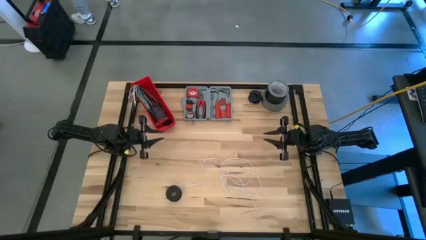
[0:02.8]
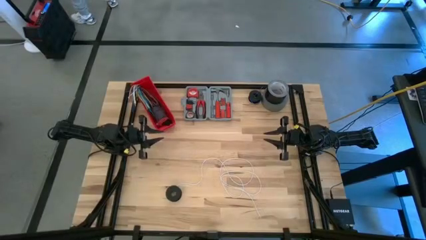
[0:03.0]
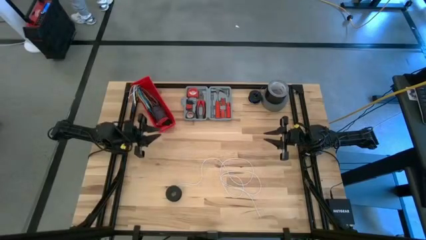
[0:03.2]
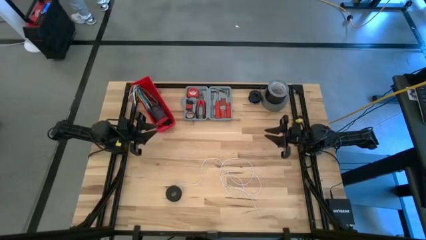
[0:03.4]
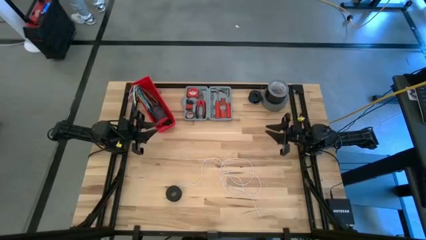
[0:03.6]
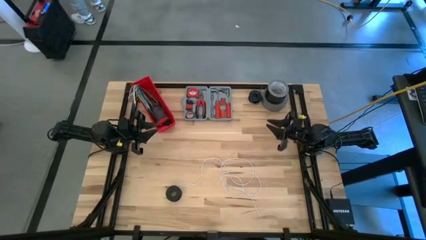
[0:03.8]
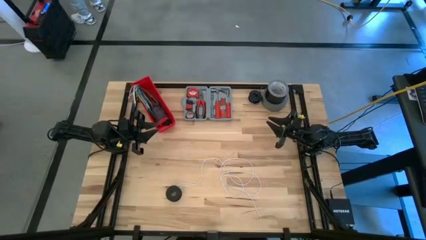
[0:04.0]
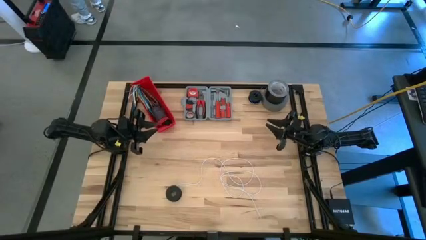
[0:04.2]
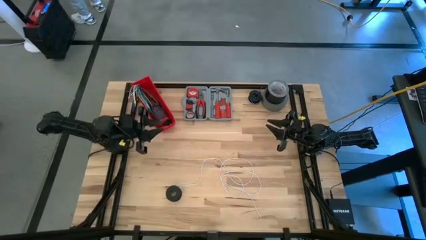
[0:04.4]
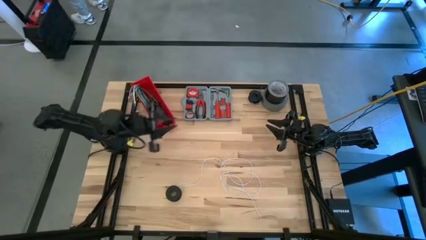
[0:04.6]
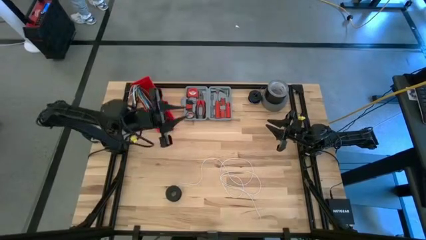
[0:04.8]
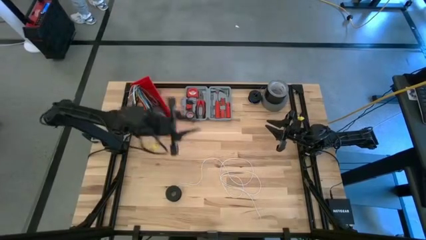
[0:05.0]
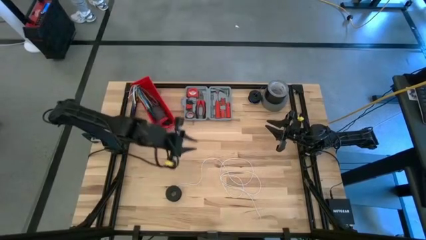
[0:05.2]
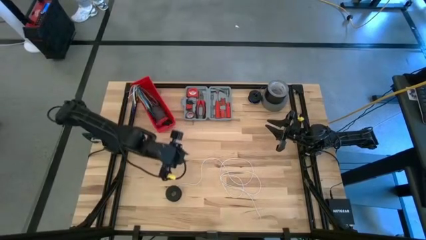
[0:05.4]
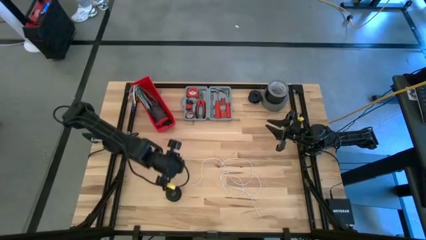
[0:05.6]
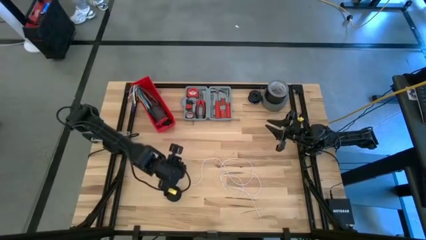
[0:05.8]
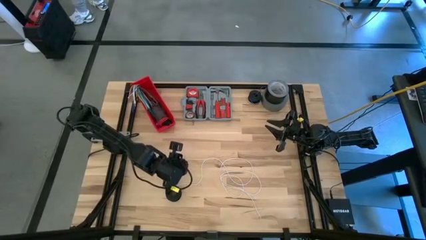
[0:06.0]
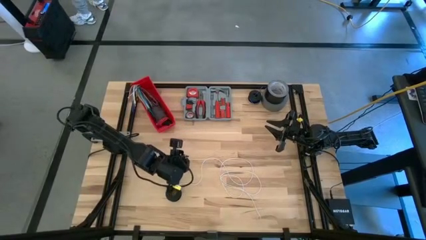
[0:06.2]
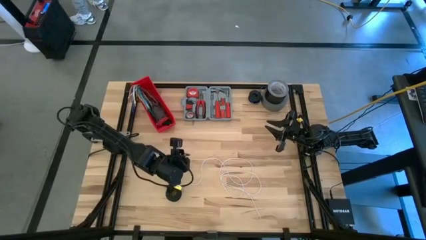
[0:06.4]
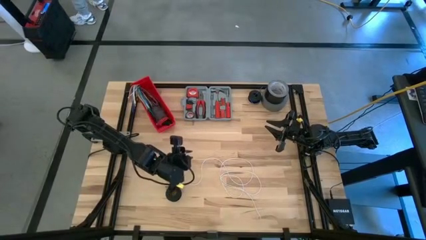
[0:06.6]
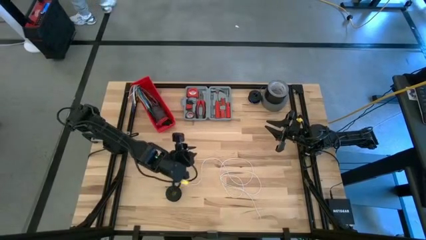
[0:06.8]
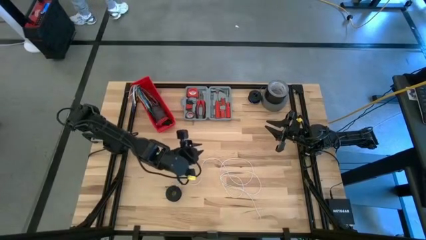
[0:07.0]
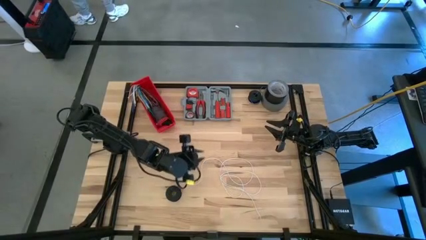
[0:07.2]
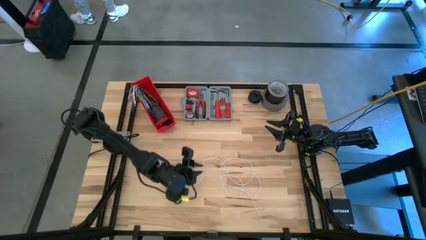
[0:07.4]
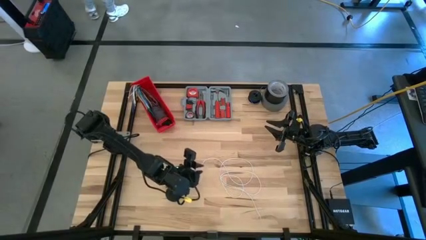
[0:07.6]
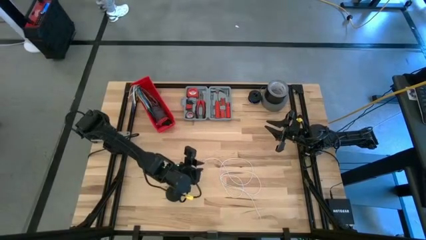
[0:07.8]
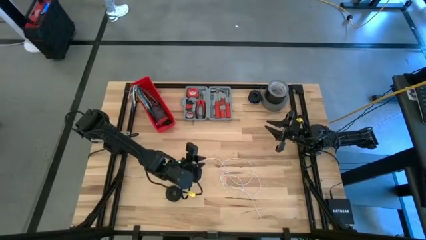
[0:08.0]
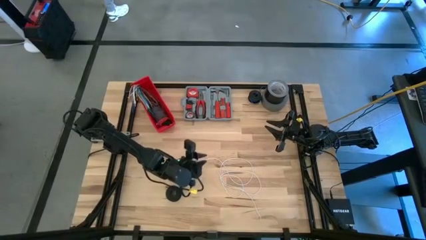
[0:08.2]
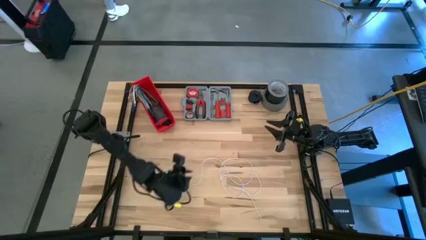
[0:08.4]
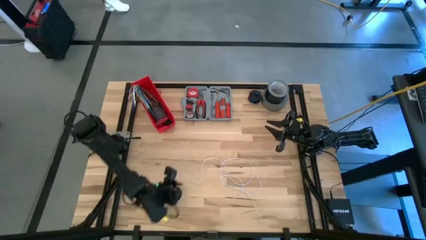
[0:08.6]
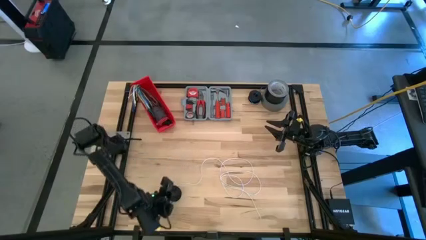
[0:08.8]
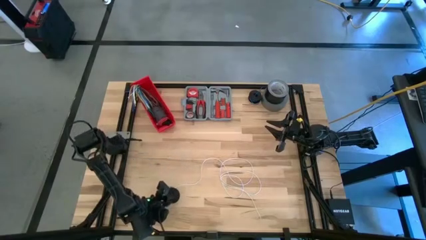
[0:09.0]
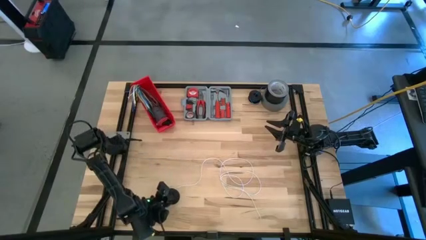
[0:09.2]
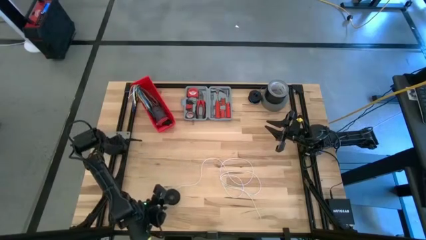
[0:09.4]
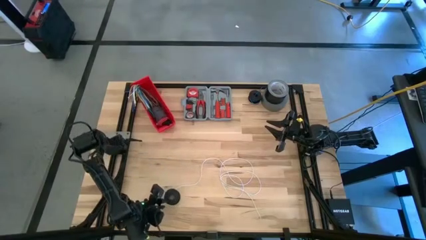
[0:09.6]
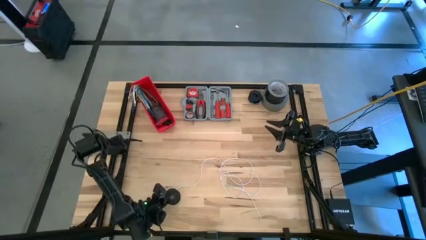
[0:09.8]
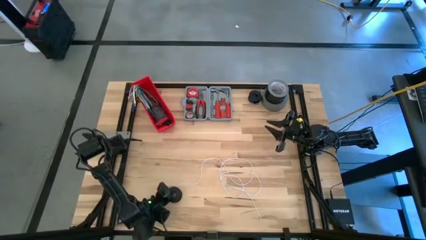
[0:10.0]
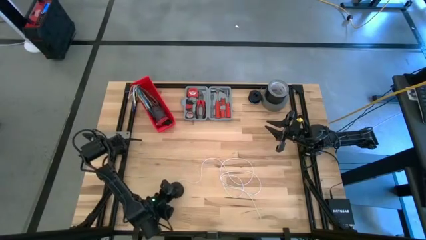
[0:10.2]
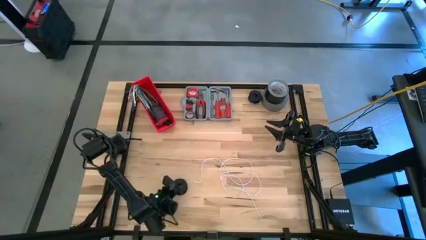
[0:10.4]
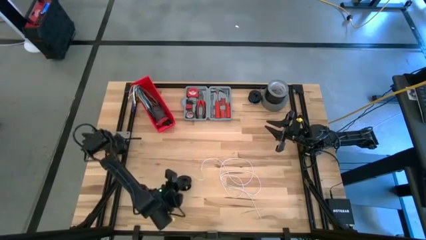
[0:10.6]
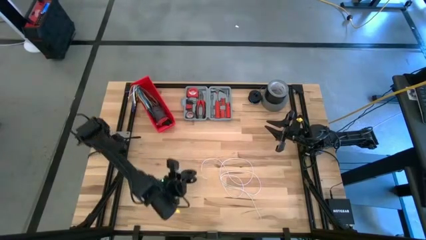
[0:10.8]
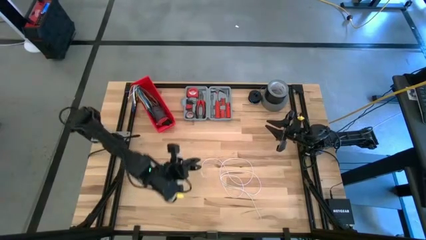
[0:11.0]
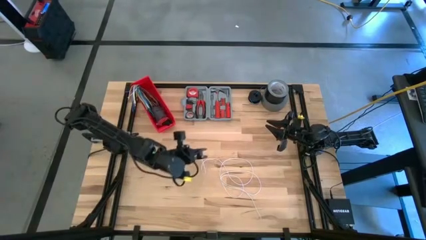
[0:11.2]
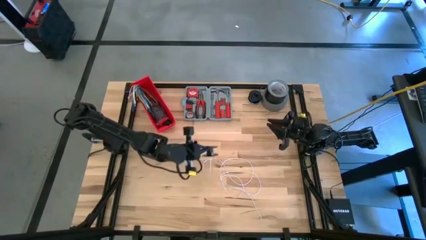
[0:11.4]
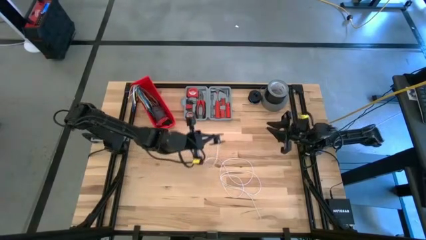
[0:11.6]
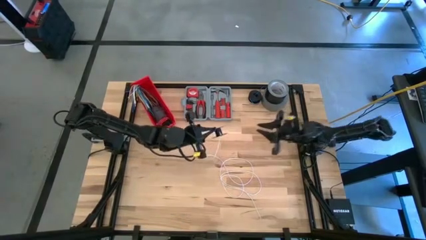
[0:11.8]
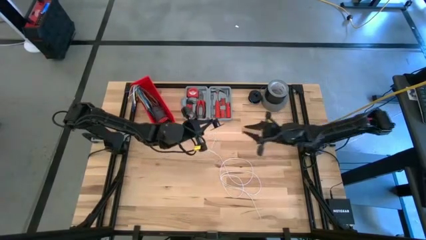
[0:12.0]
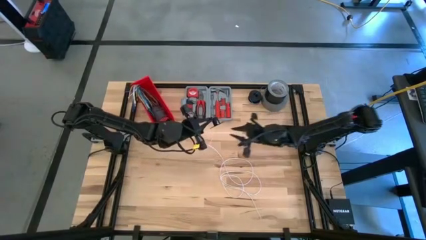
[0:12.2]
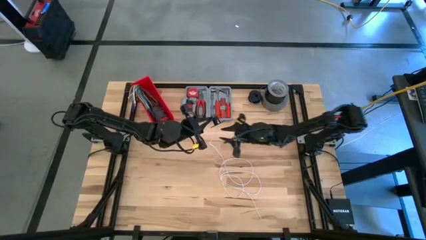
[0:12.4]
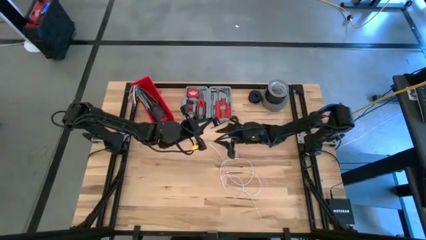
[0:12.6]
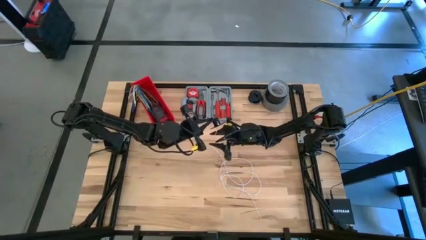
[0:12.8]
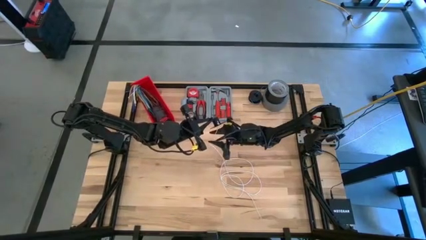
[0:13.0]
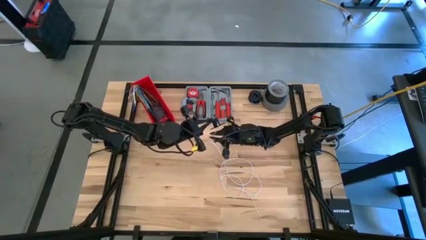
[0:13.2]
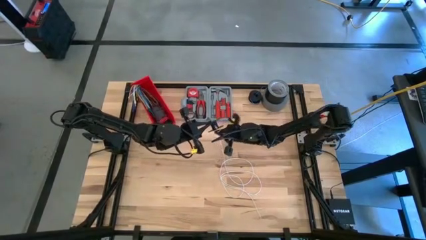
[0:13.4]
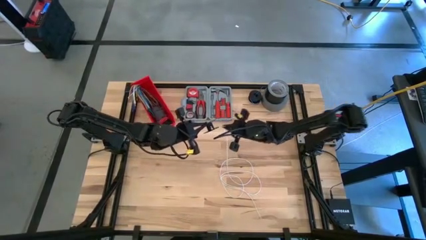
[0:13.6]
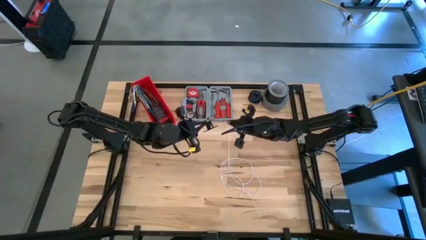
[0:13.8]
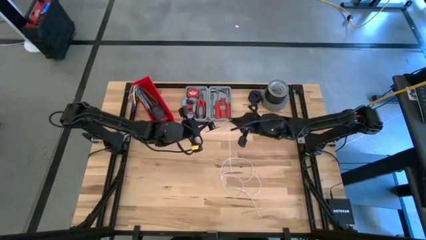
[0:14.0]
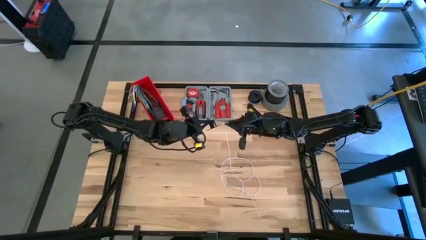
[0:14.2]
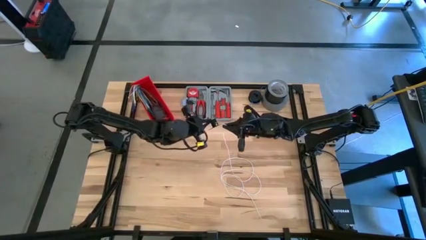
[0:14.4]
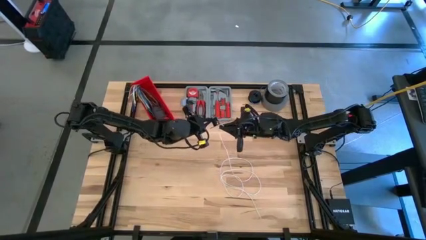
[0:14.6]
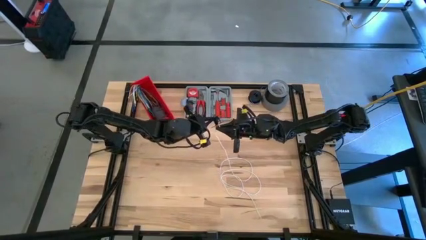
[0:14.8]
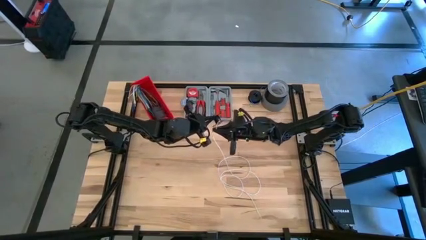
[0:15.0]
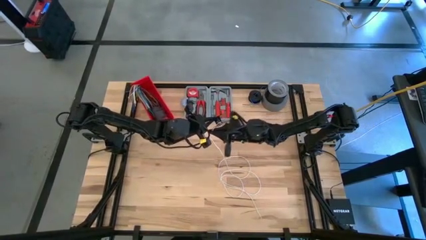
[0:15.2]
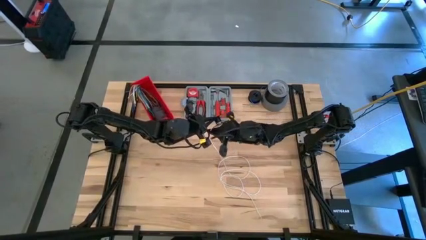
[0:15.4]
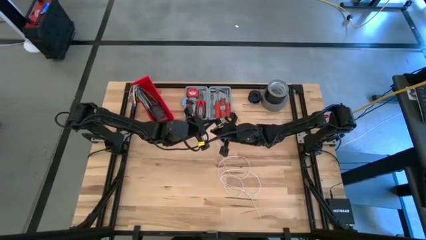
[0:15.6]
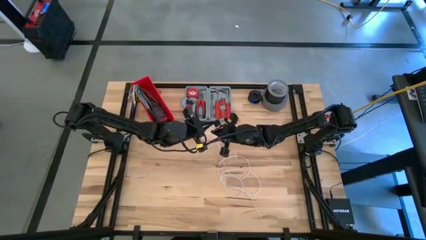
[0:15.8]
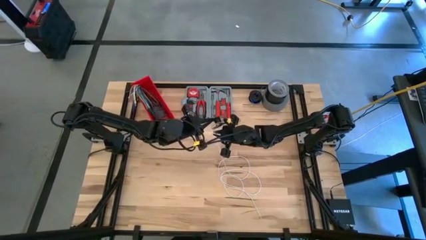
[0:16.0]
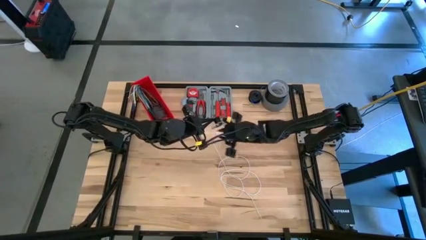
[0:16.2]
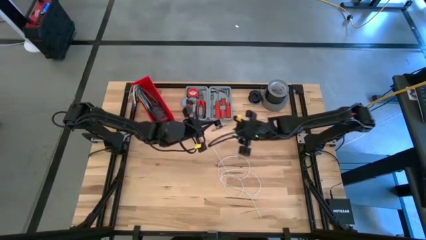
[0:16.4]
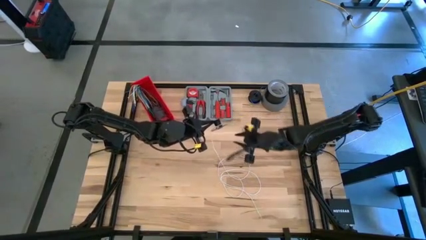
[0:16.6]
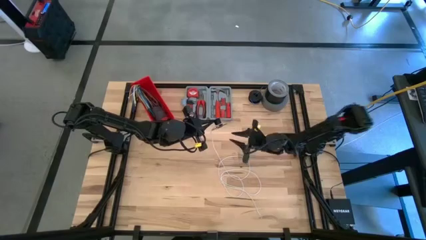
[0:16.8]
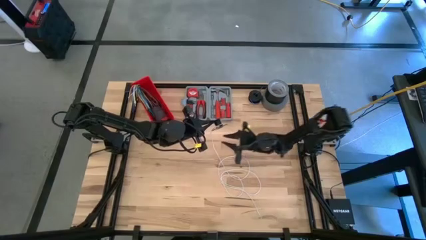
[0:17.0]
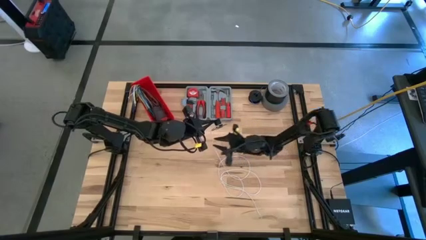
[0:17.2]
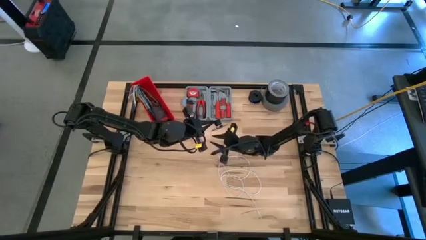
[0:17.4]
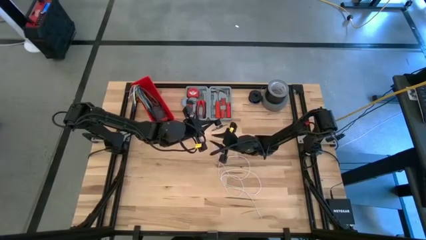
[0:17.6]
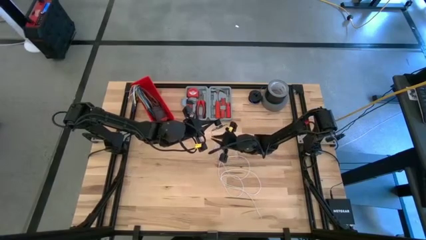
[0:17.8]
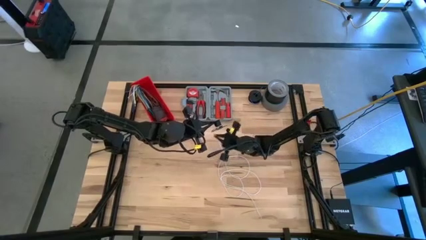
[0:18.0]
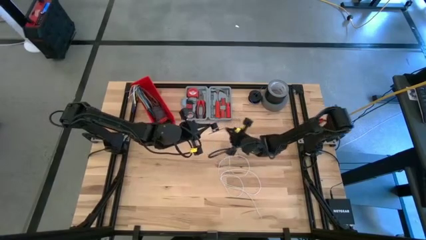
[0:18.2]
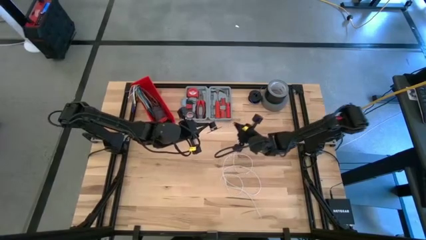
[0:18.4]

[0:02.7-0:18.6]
Task: Coil cords
Coil the white wire into the spool
